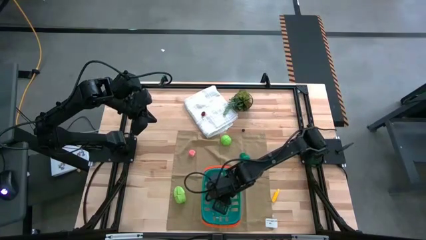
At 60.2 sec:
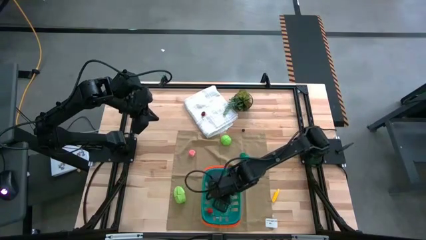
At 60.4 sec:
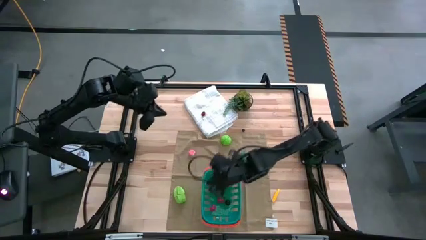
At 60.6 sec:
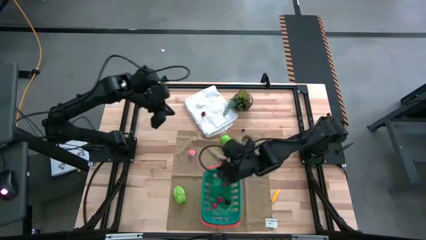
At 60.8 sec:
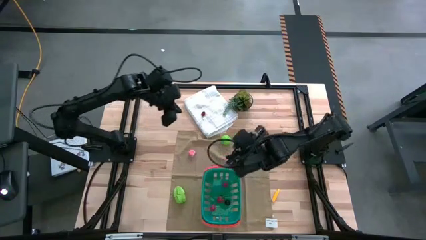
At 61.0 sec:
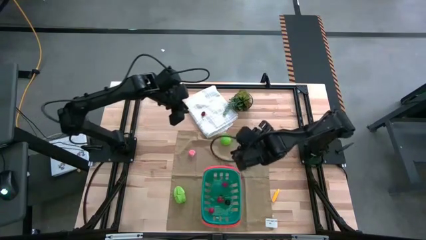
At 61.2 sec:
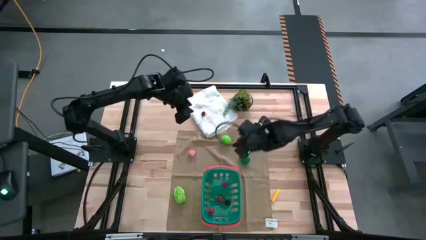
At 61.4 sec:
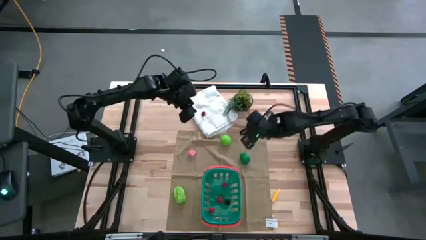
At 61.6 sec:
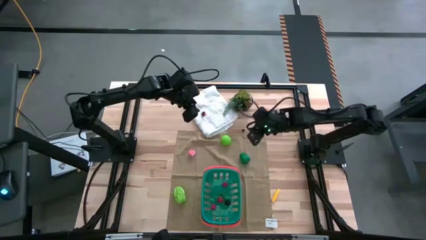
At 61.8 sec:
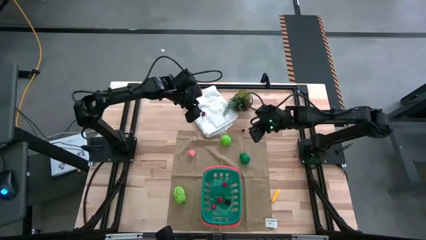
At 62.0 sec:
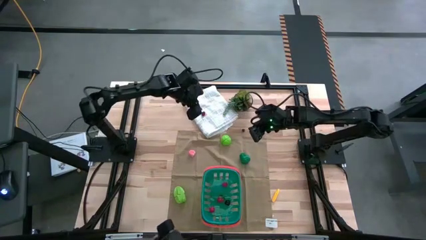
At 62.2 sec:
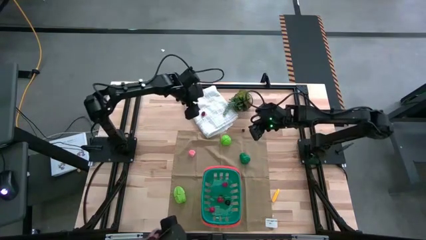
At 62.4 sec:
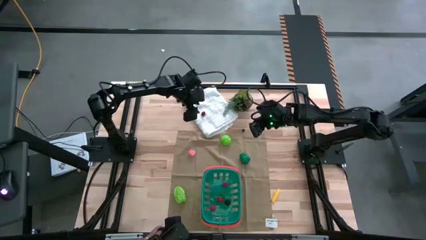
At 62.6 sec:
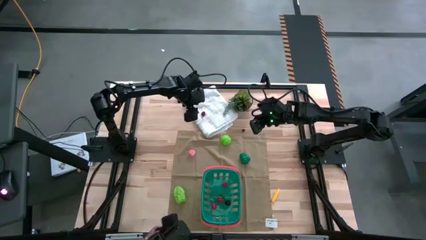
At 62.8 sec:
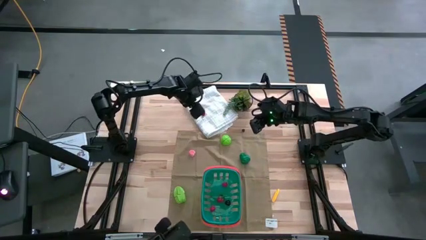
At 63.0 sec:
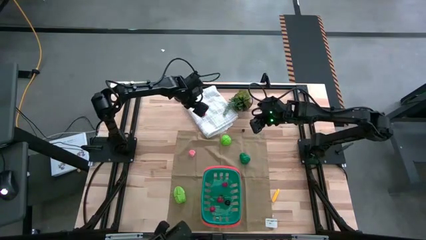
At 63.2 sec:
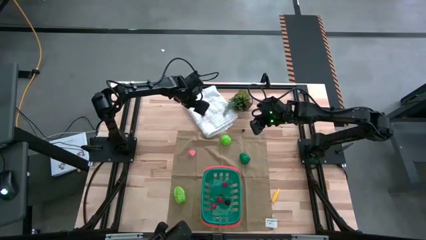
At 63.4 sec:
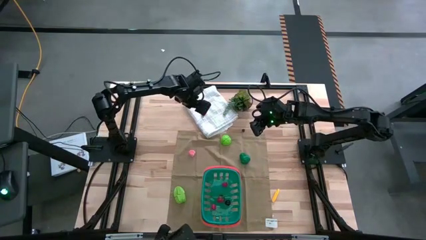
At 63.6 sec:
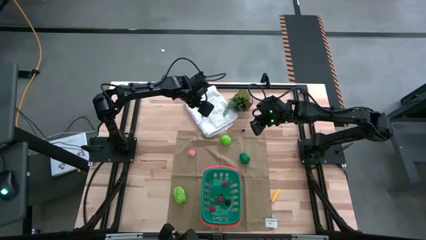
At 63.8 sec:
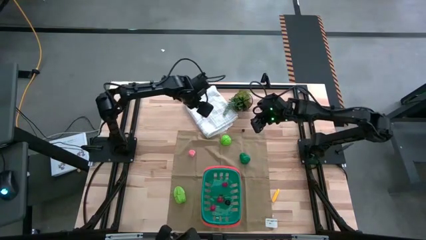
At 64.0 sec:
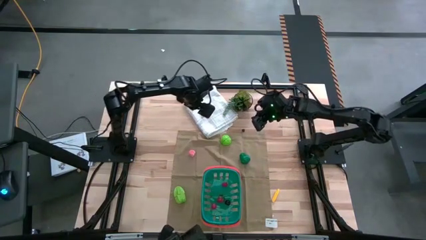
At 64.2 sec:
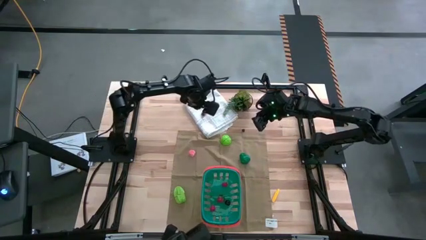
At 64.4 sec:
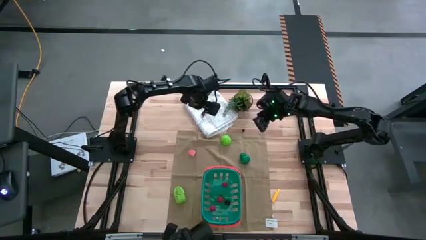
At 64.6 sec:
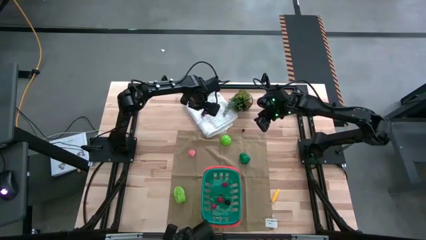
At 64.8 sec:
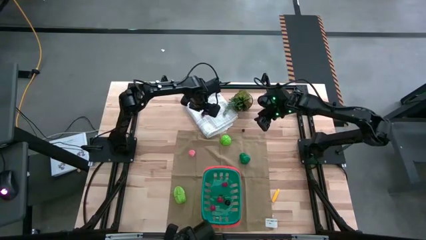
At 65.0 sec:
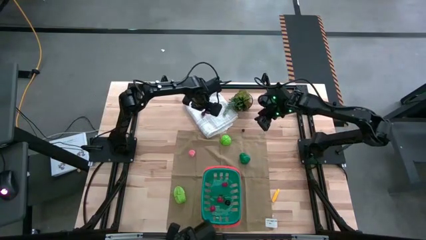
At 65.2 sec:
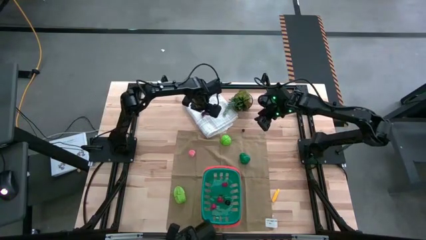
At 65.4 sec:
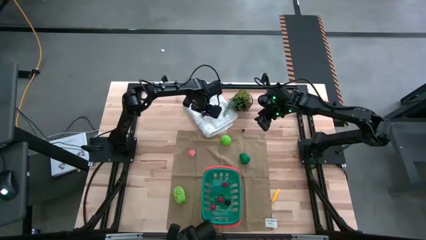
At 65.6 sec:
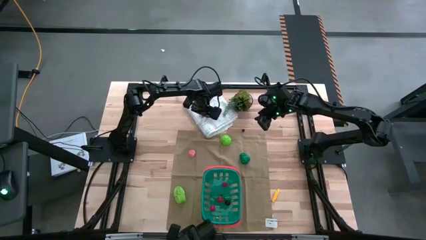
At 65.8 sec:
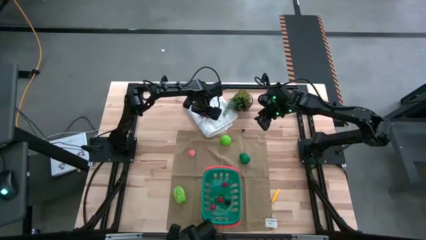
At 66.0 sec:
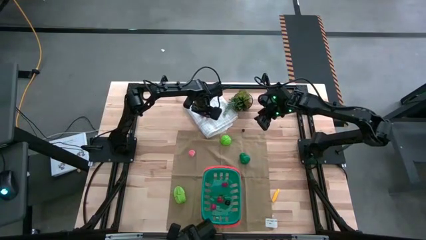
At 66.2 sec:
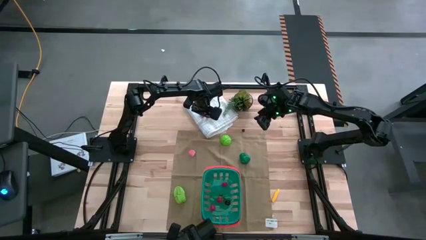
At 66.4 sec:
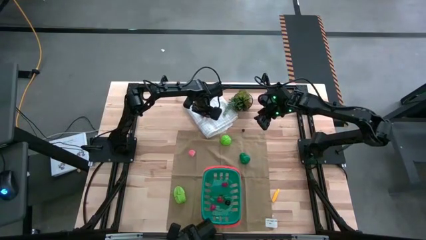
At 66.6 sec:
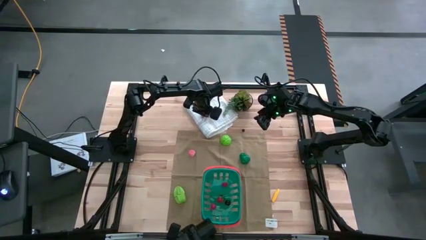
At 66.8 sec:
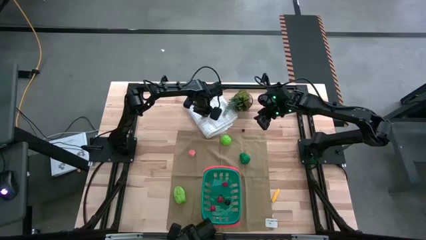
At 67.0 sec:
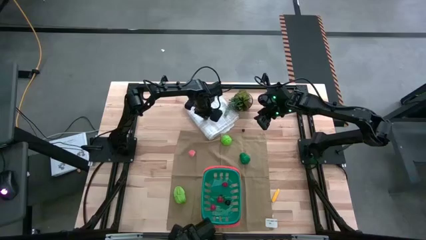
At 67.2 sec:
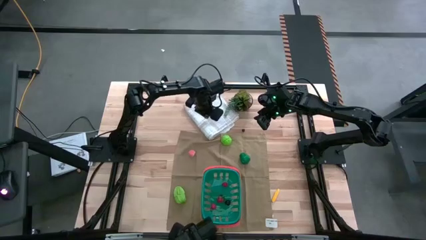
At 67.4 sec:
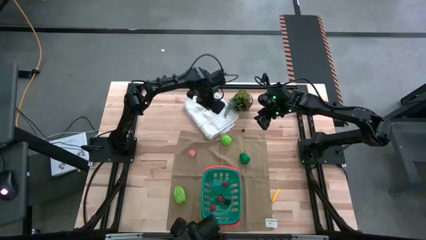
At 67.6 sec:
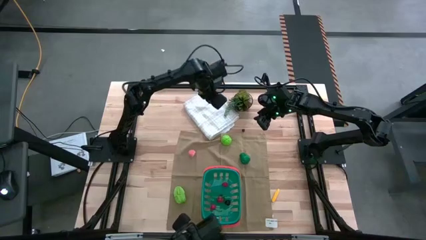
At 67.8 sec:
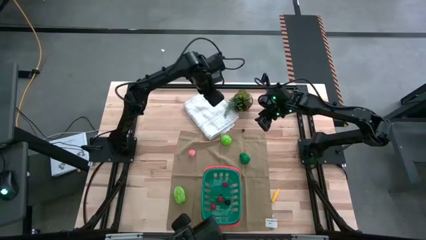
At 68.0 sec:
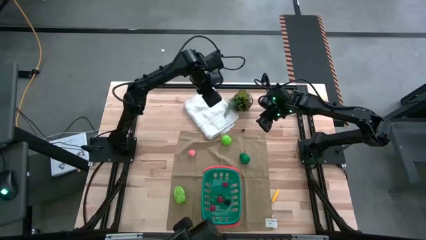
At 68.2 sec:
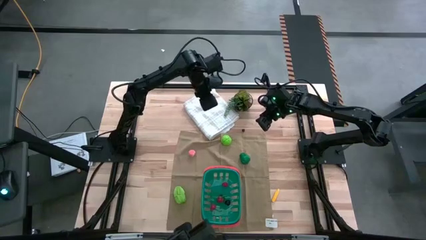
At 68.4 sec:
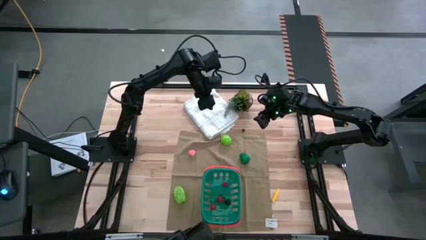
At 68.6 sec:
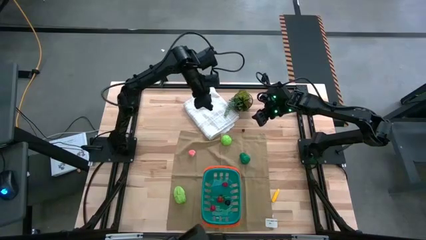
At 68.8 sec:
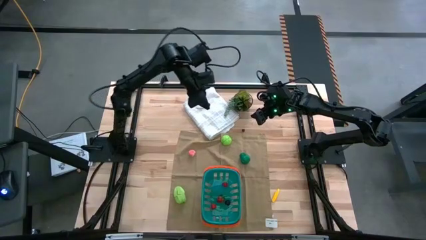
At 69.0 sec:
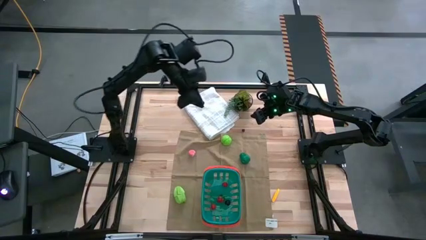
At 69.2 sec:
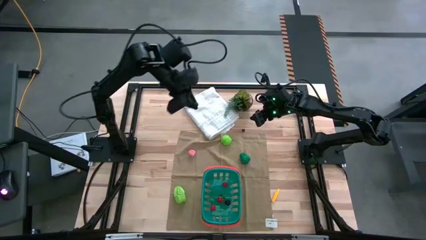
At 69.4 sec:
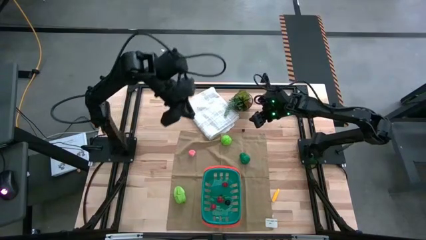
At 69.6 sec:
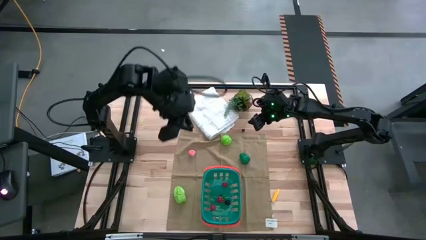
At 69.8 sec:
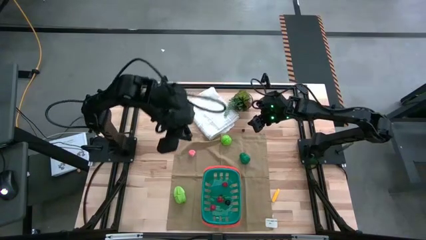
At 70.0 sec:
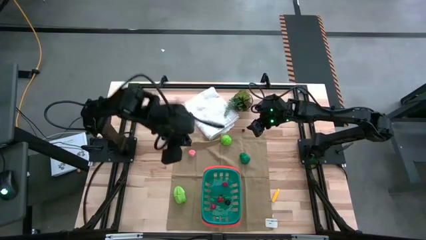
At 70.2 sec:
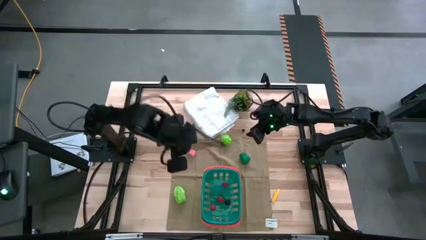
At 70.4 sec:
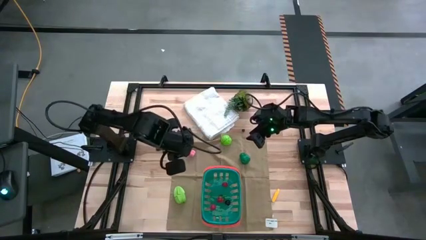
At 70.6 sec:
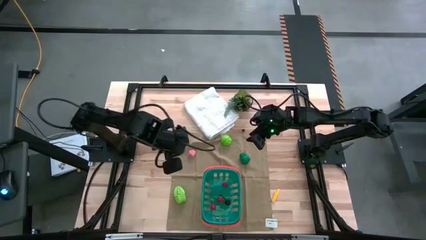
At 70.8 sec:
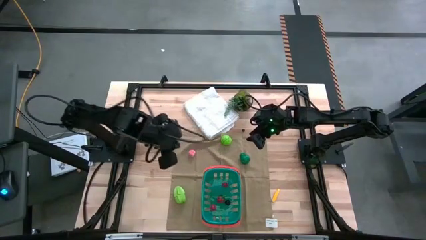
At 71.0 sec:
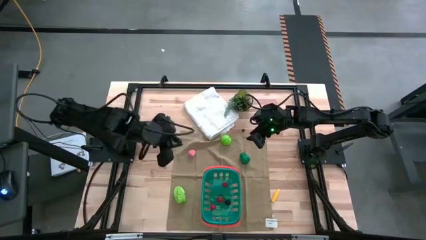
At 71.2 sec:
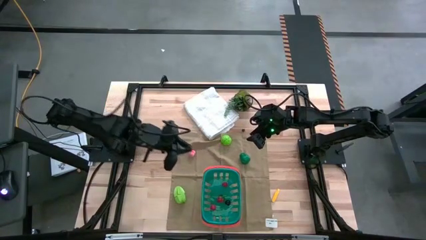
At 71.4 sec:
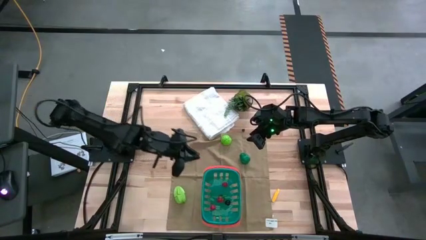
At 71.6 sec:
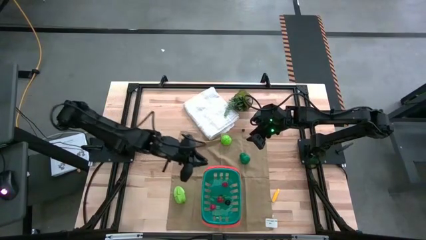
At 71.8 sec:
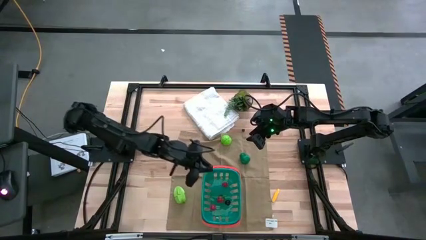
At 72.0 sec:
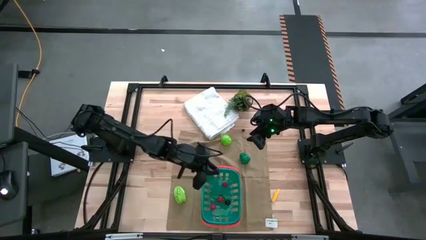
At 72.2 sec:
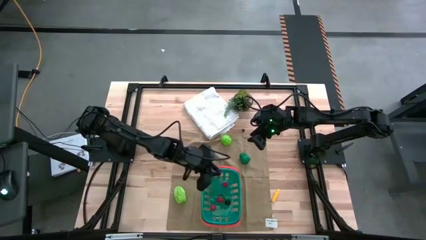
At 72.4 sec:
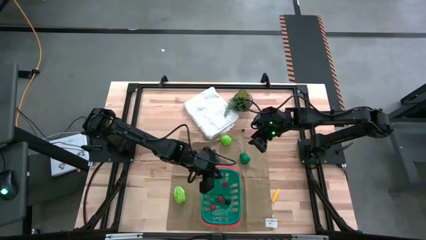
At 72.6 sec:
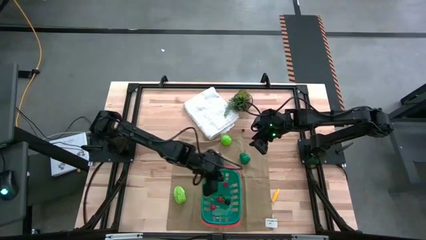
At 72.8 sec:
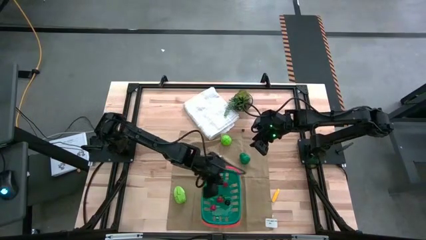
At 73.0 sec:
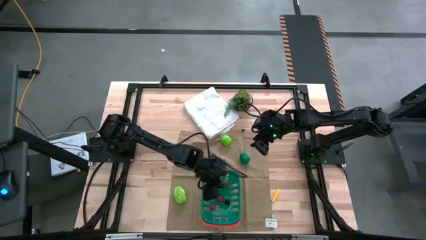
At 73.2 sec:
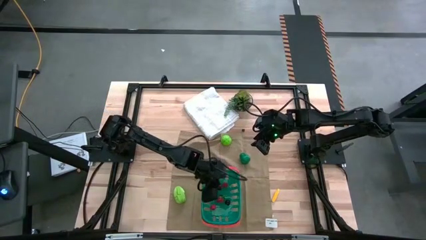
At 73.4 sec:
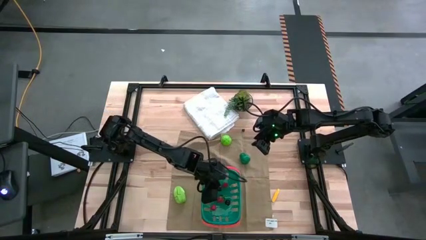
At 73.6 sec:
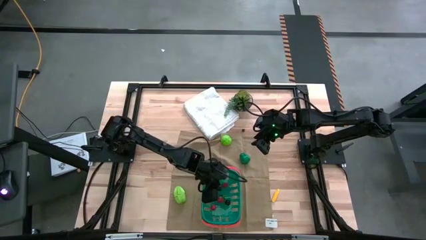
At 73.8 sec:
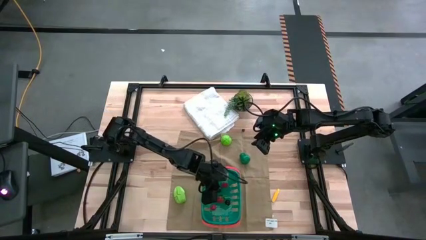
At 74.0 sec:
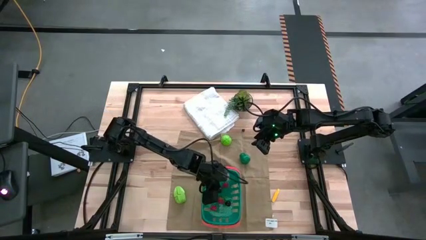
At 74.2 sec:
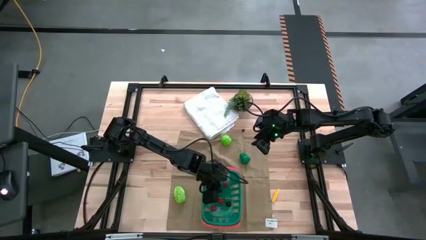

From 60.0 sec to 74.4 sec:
Task: Pick and placing Produce into tupperware
Put the red cherry into the blue bin

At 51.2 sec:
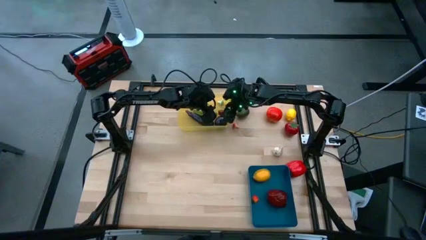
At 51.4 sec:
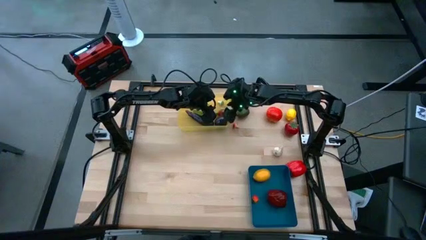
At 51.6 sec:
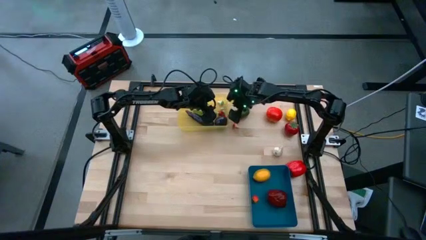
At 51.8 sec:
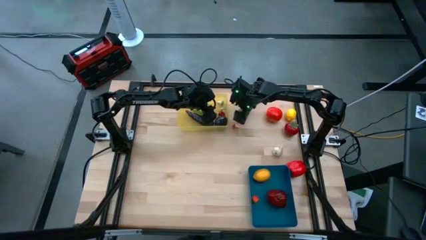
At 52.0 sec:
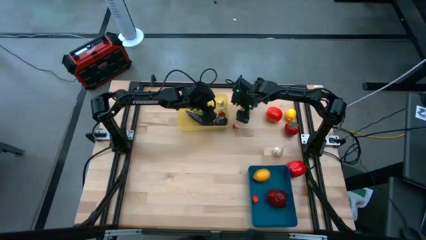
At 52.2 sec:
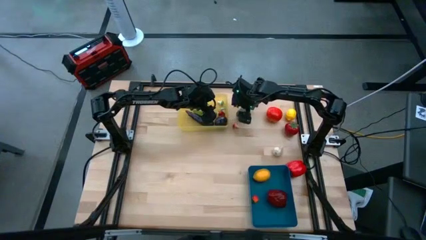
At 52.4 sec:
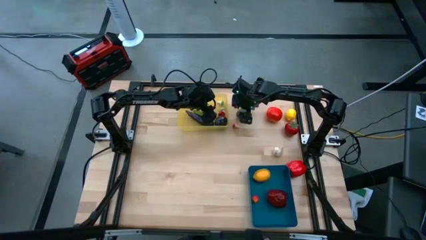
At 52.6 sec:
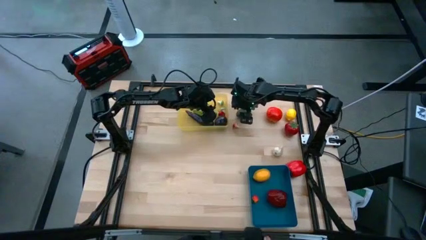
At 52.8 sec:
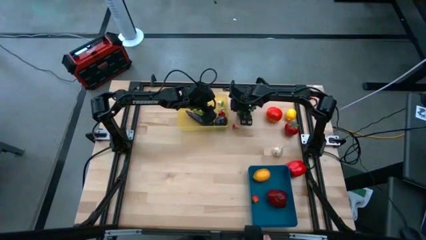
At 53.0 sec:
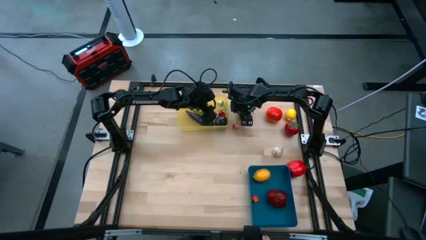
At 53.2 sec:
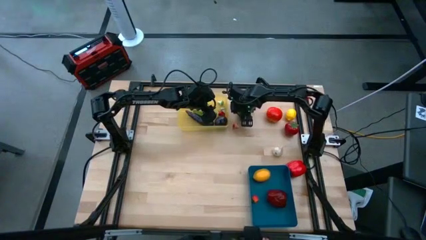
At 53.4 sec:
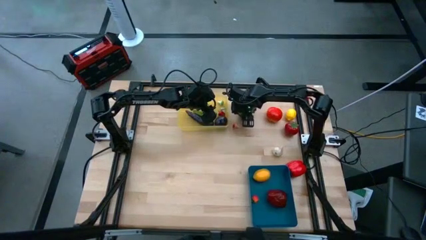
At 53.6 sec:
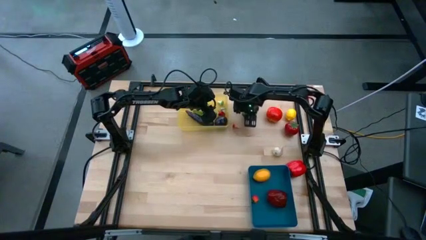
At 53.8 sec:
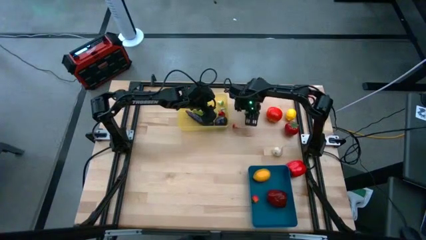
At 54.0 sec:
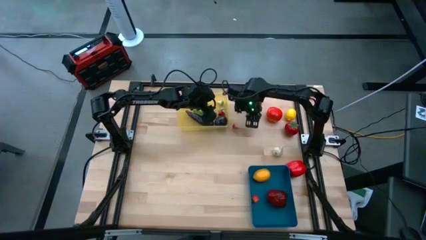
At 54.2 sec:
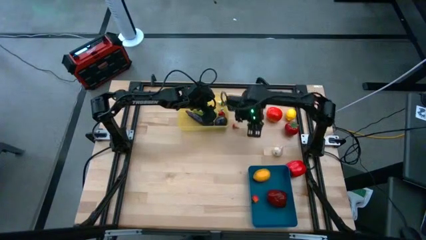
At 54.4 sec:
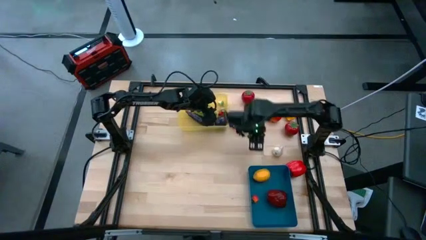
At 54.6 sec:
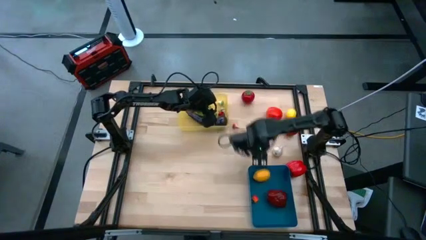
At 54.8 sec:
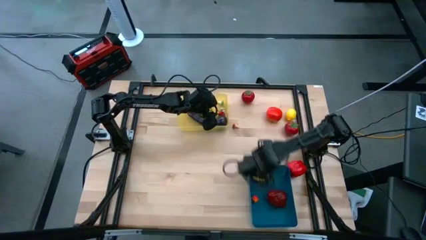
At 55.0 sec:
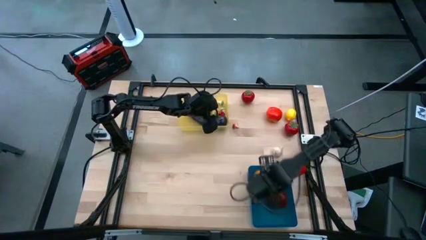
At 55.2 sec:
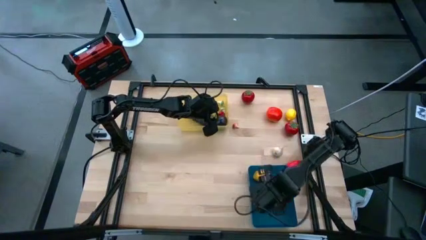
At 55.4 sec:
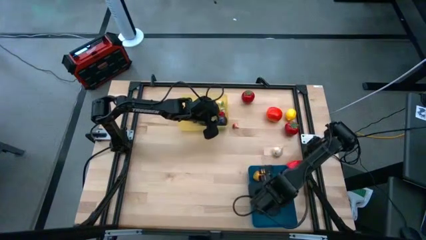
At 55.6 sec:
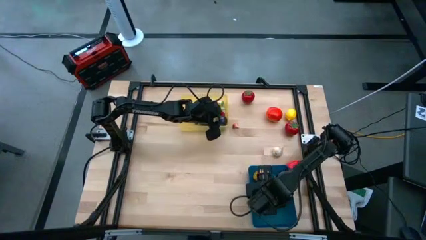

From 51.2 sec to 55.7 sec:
Task: Sort produce into baskets
Put the green lime into the blue bin
